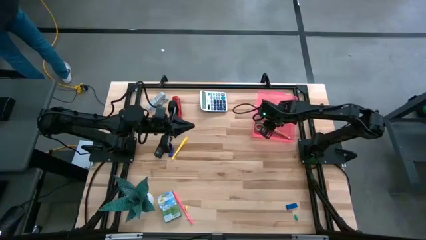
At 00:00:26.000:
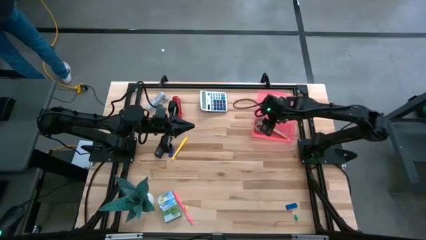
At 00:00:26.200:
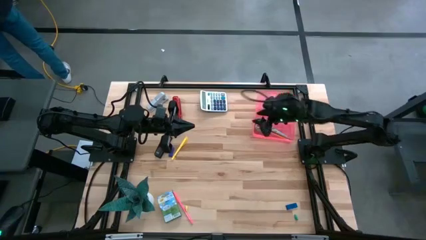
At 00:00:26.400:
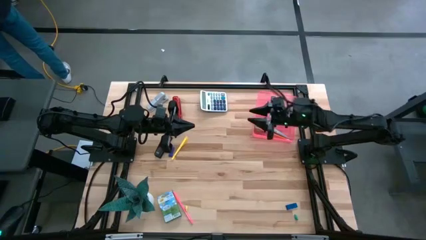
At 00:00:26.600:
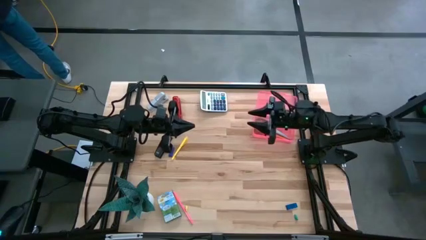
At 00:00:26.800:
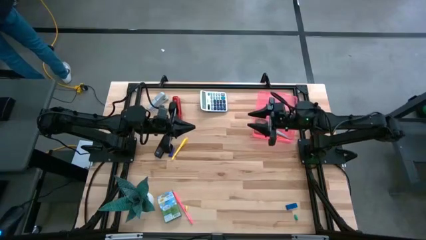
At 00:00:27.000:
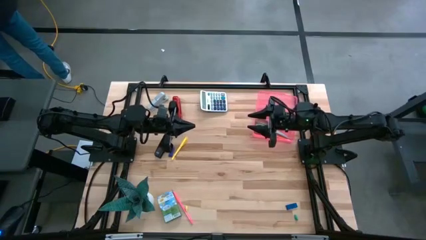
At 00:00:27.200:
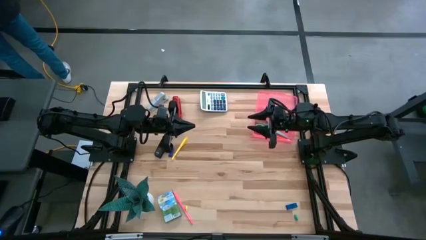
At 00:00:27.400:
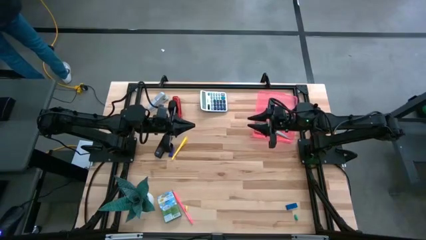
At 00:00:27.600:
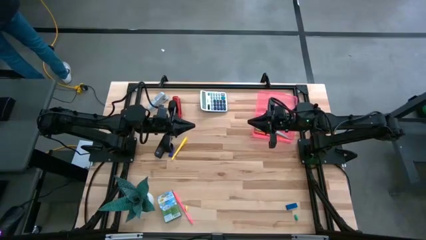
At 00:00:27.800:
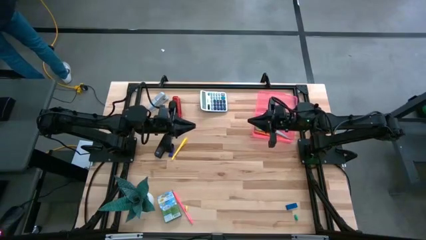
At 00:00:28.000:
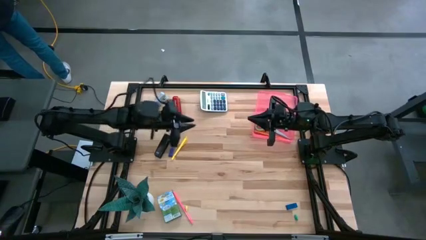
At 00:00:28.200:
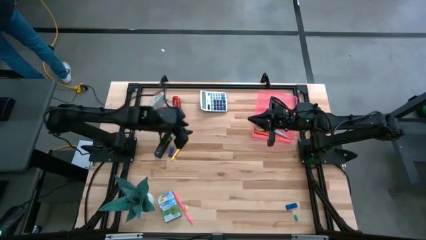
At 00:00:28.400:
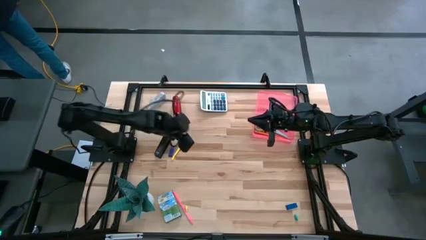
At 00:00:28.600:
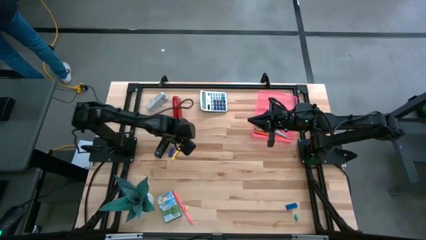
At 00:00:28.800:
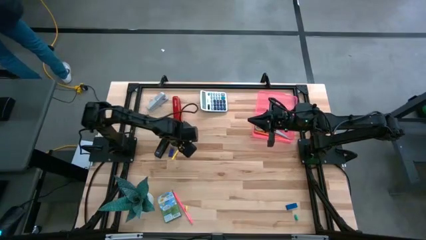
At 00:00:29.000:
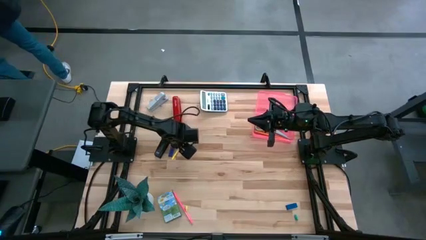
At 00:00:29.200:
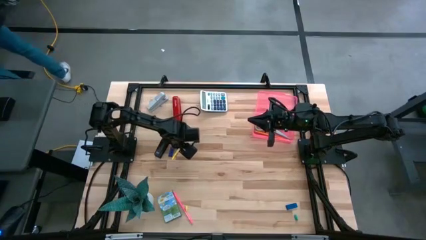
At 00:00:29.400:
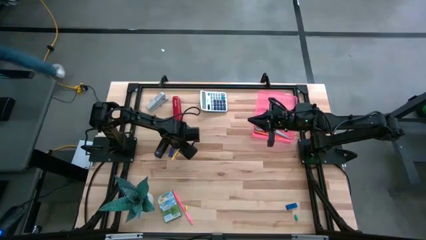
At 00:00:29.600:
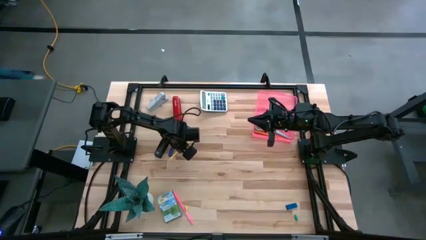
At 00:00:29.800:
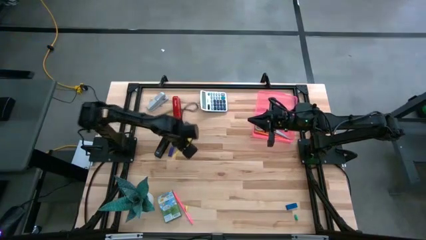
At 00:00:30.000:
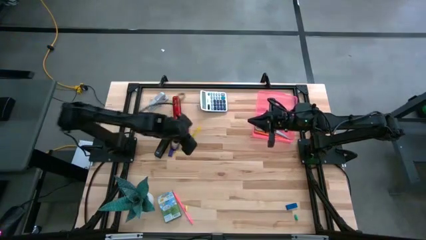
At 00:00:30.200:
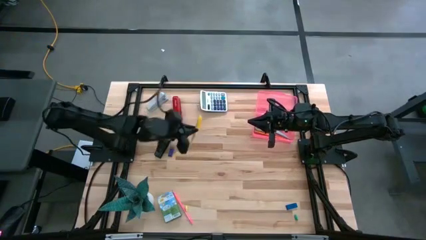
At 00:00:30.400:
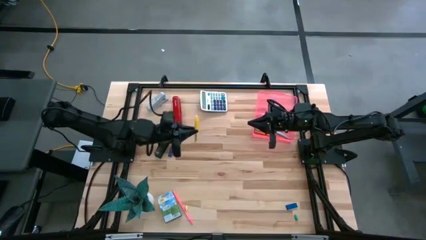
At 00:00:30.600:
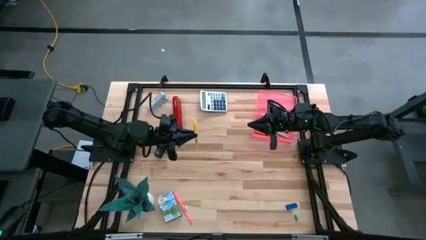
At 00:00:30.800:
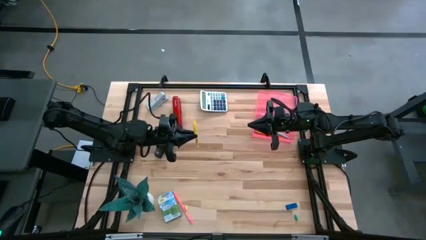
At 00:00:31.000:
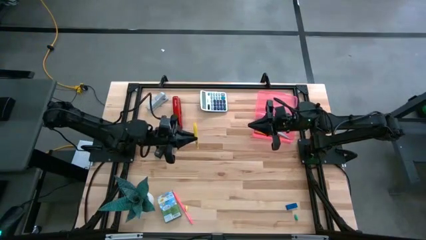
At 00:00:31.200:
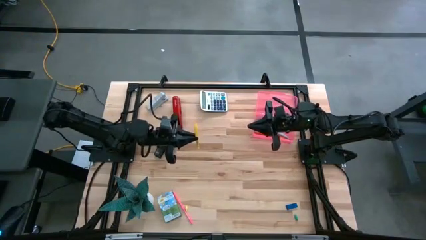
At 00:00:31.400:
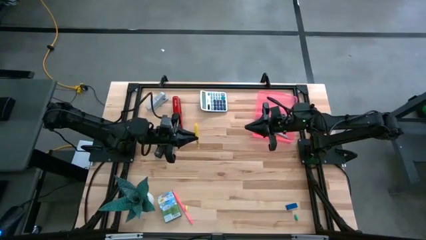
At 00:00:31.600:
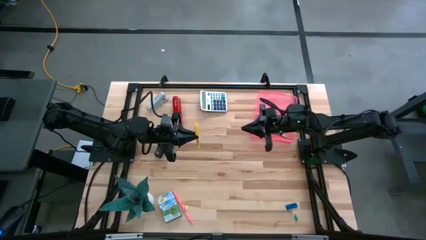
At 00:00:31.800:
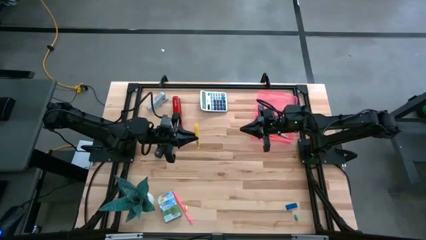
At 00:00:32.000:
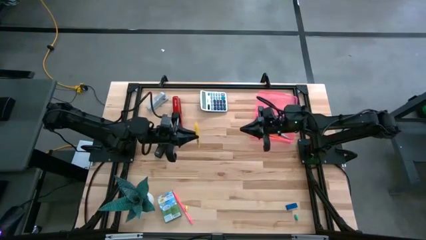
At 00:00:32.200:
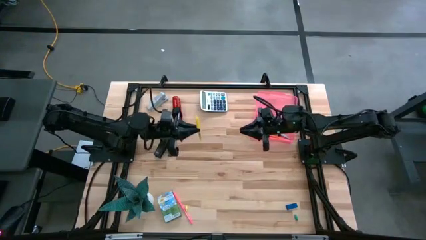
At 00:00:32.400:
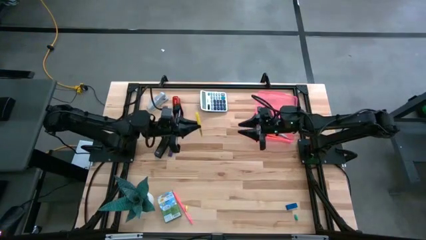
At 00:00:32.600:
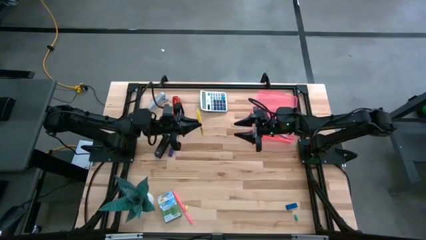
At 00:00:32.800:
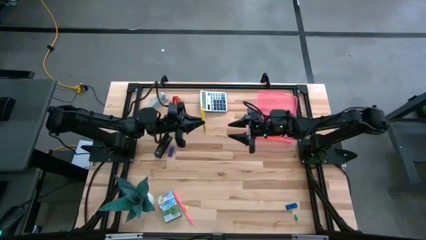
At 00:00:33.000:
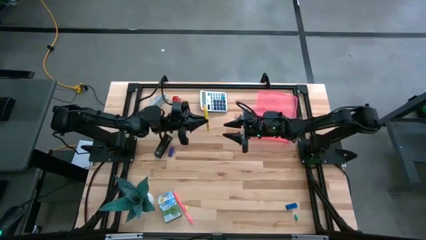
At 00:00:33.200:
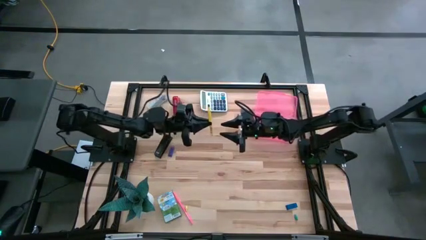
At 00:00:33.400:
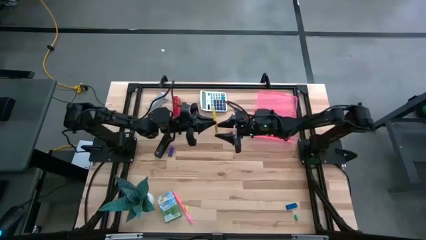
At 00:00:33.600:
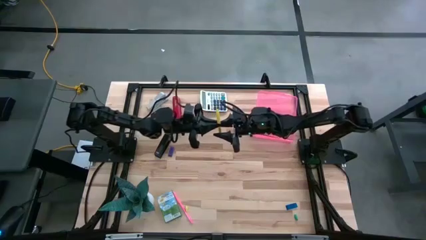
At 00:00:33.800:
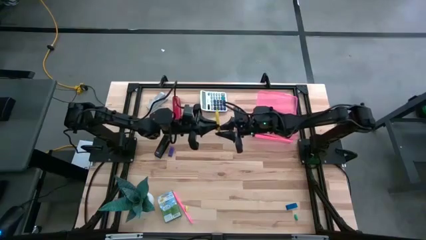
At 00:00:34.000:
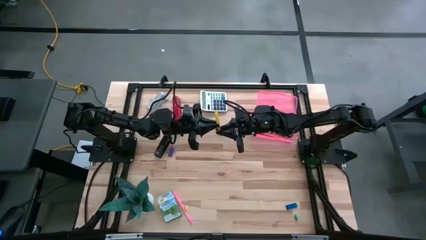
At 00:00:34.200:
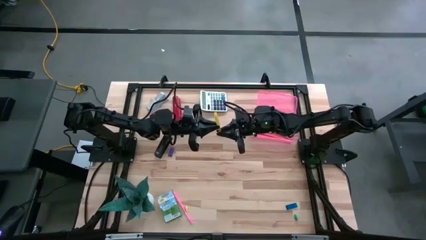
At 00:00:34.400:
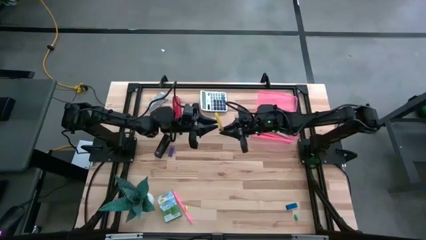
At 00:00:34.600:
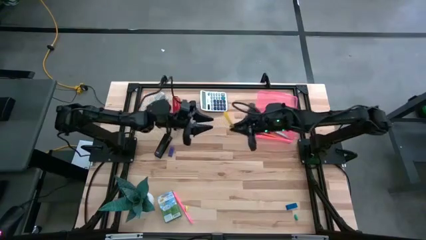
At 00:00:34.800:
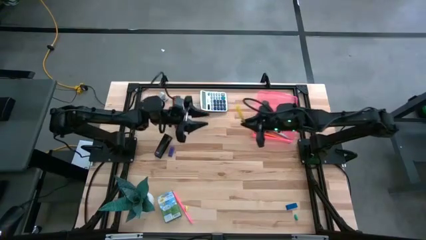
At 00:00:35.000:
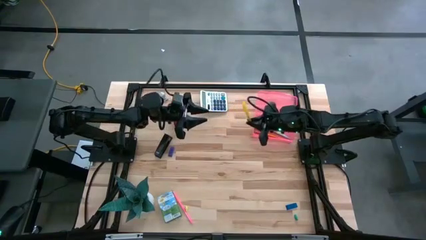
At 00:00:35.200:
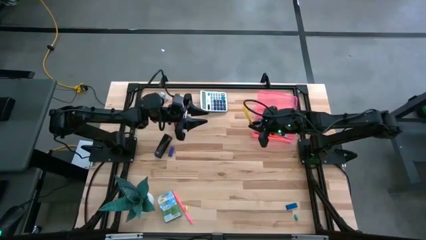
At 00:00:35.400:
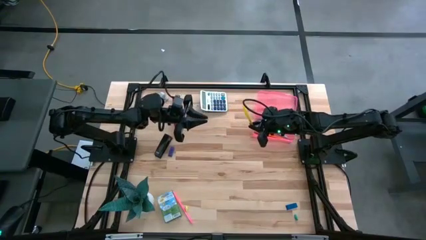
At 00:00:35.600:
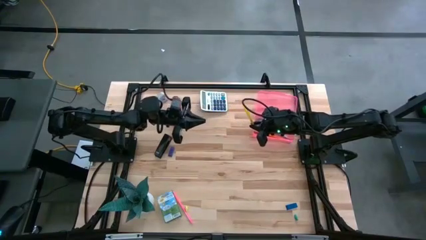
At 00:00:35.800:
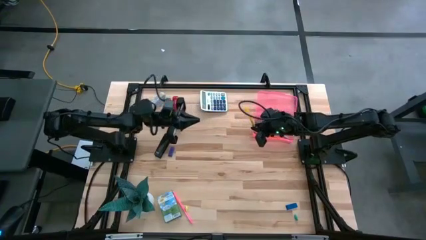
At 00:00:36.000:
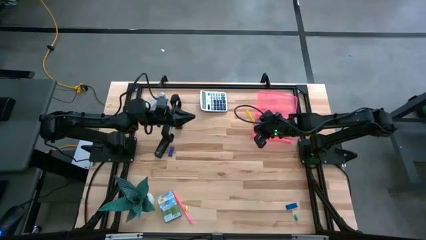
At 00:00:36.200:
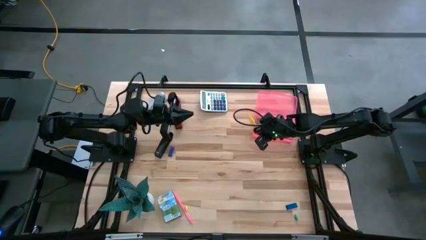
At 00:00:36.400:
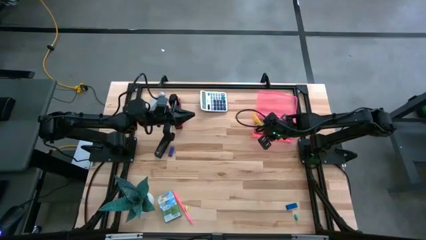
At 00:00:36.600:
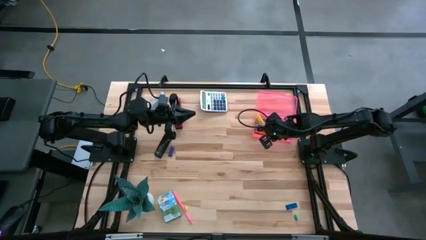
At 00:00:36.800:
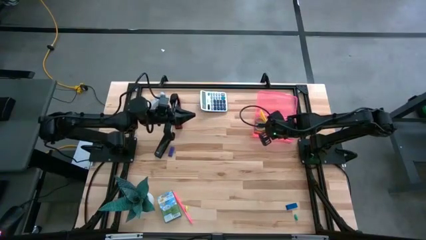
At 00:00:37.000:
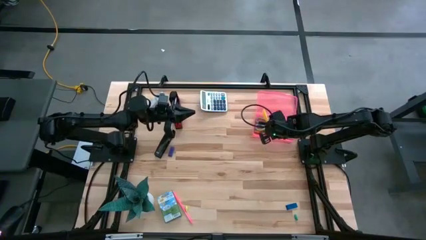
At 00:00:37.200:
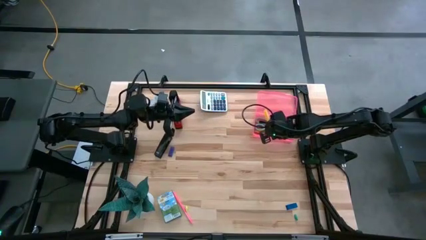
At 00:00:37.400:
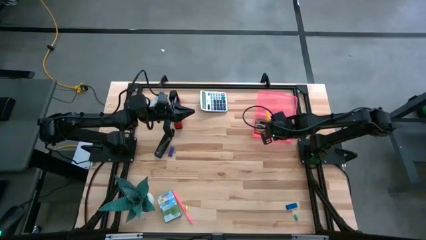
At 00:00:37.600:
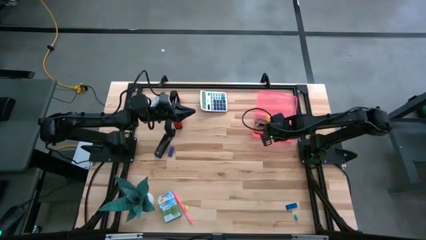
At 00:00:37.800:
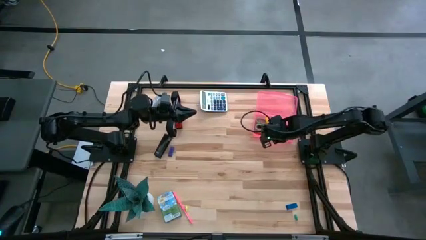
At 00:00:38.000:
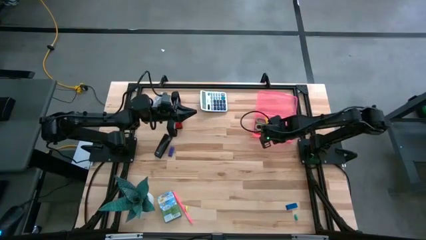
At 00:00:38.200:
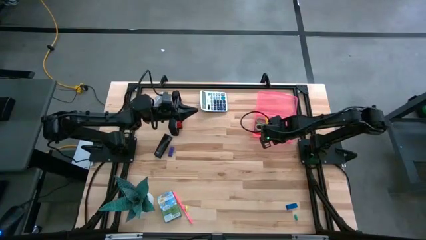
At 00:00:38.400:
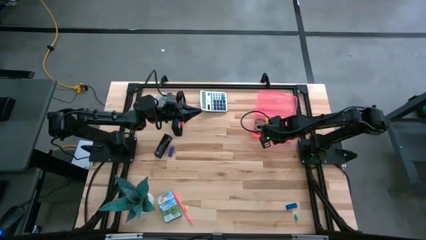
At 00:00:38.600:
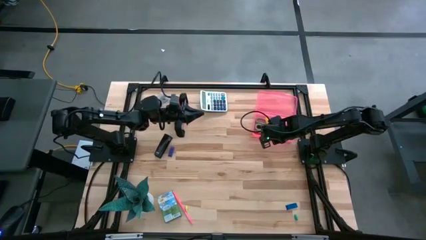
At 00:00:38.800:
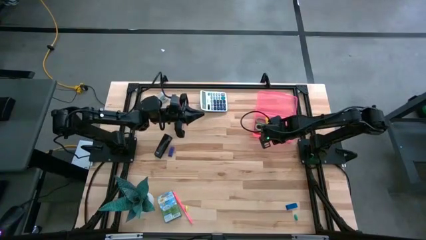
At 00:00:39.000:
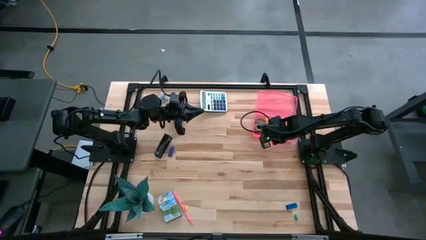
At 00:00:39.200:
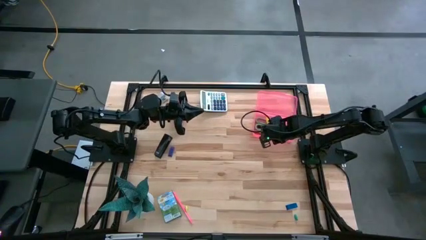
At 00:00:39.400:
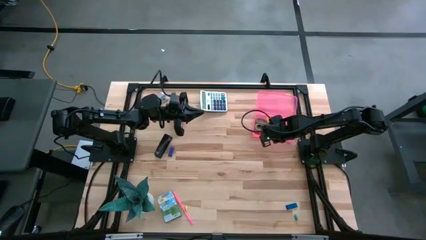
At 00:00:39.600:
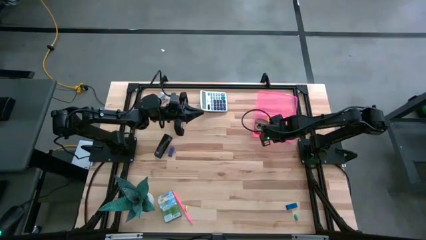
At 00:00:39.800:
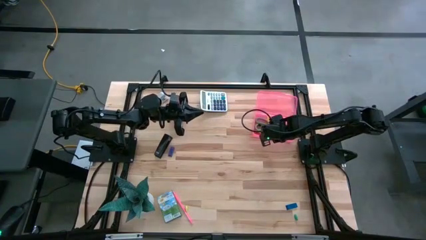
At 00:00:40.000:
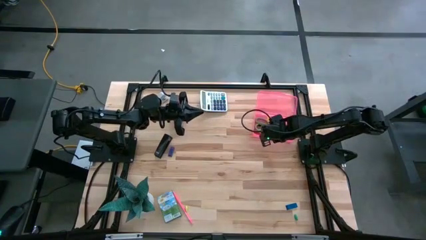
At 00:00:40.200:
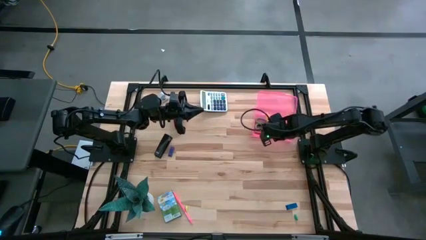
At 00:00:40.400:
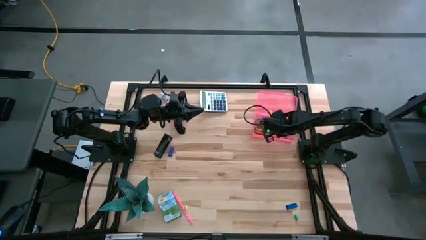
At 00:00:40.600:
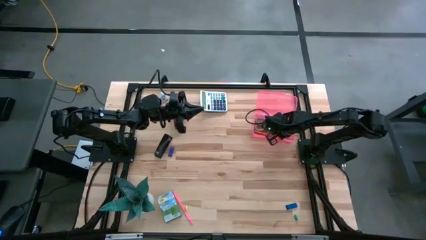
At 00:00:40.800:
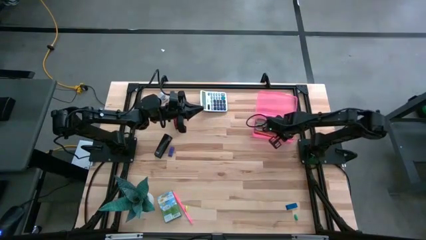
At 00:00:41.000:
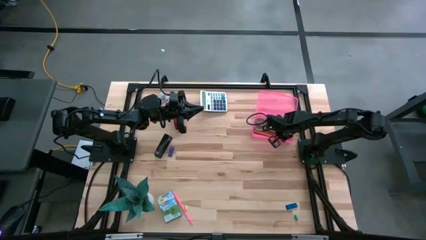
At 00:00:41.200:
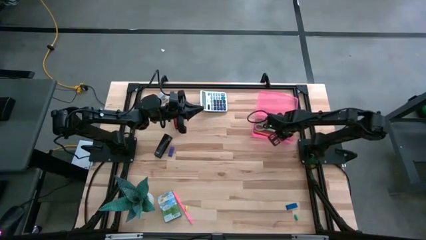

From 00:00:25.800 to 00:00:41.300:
Task: Pack school essentials
Put the yellow pen into the pink supply box
